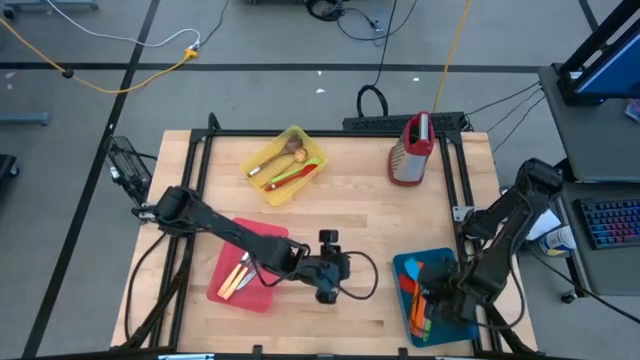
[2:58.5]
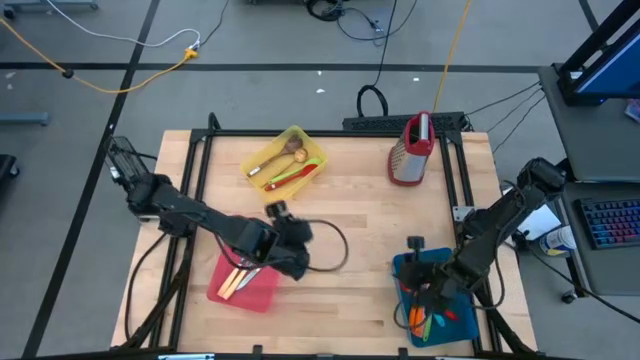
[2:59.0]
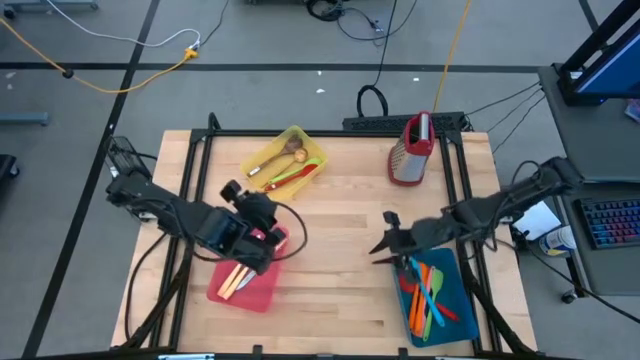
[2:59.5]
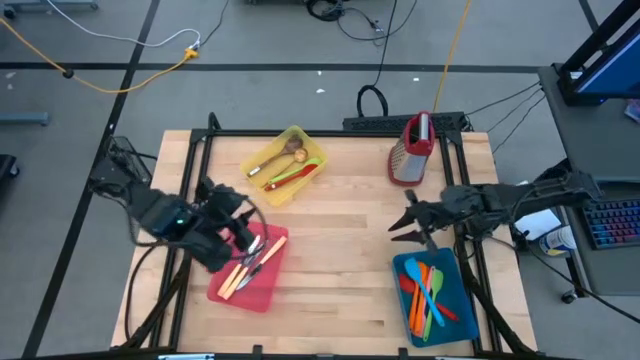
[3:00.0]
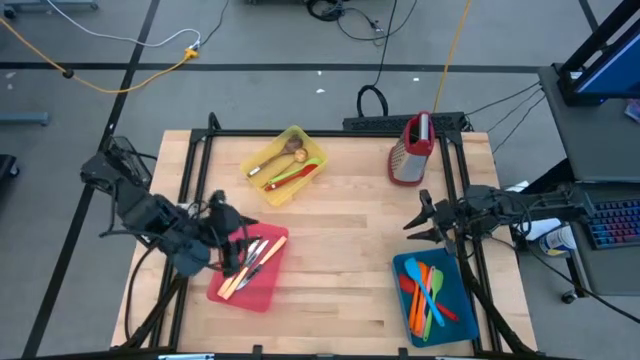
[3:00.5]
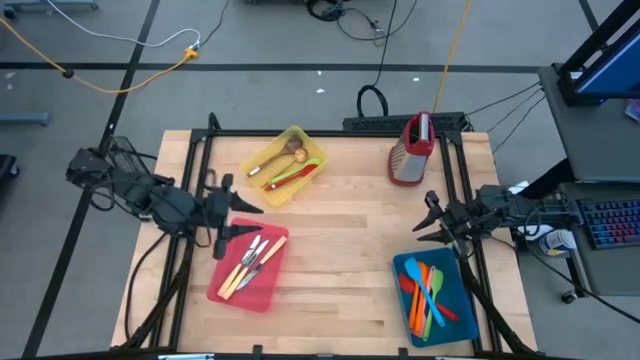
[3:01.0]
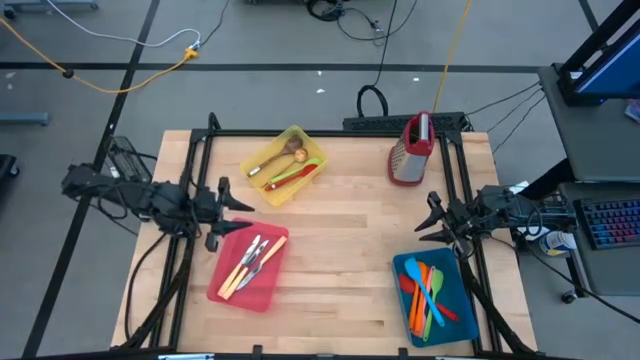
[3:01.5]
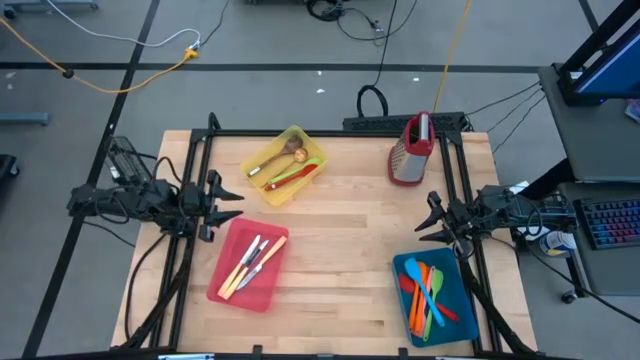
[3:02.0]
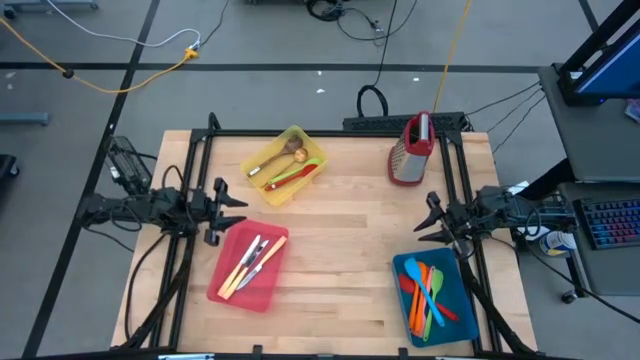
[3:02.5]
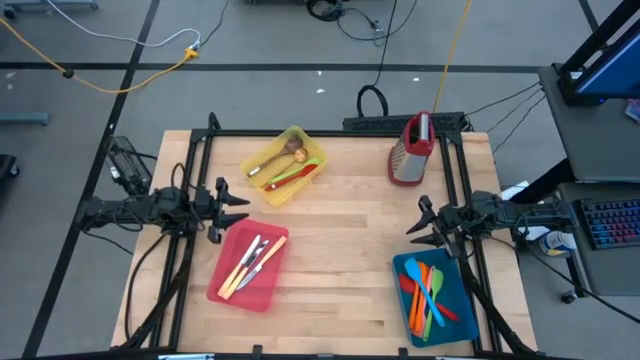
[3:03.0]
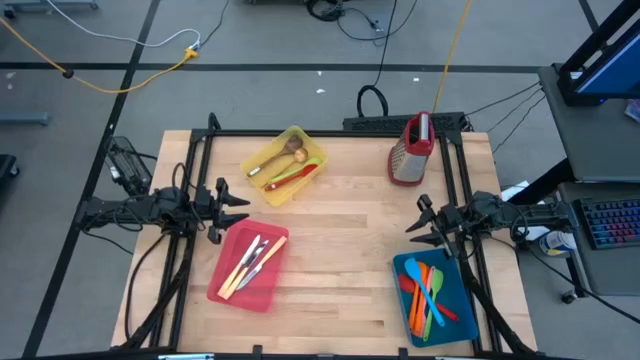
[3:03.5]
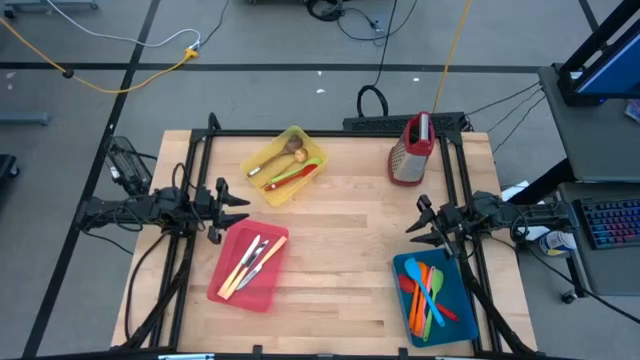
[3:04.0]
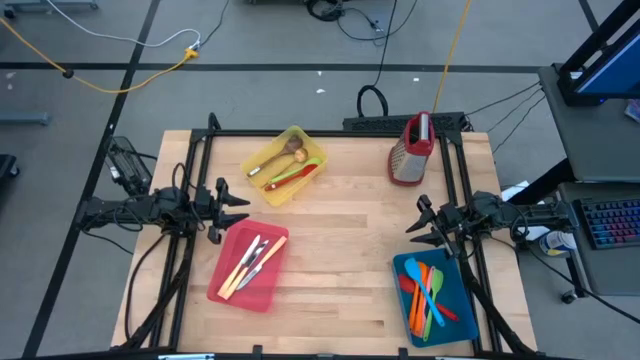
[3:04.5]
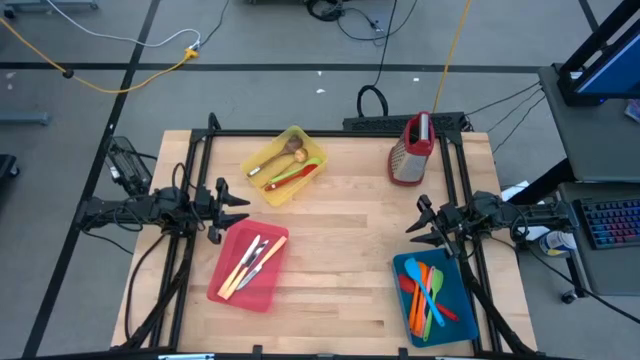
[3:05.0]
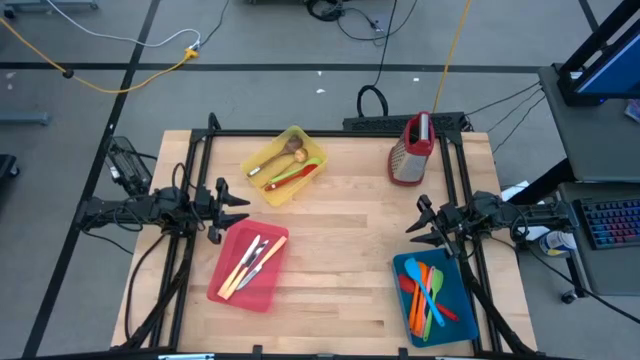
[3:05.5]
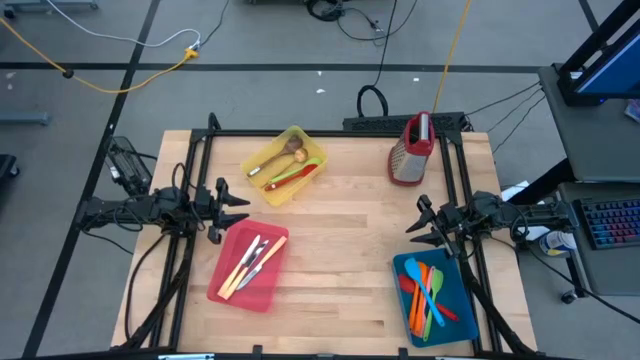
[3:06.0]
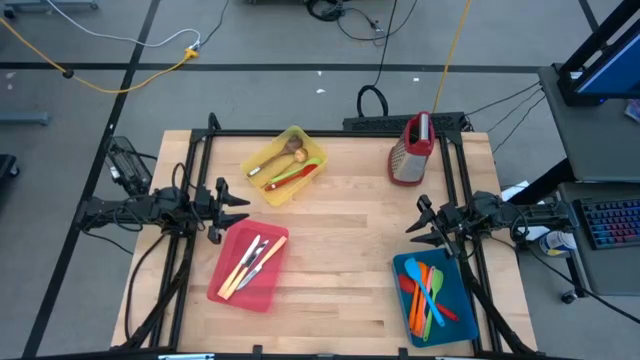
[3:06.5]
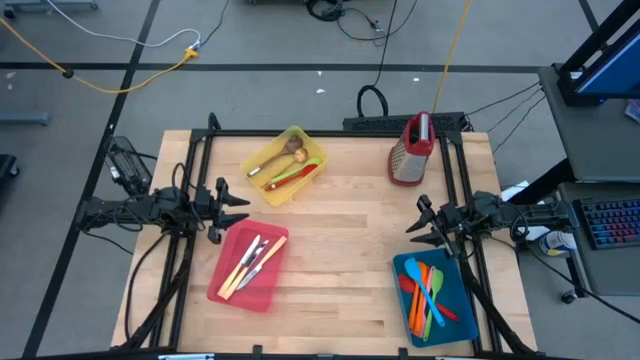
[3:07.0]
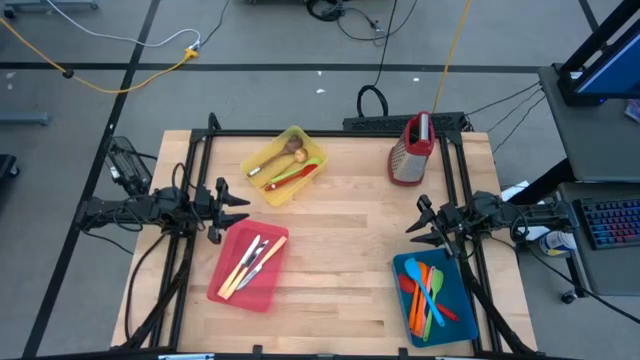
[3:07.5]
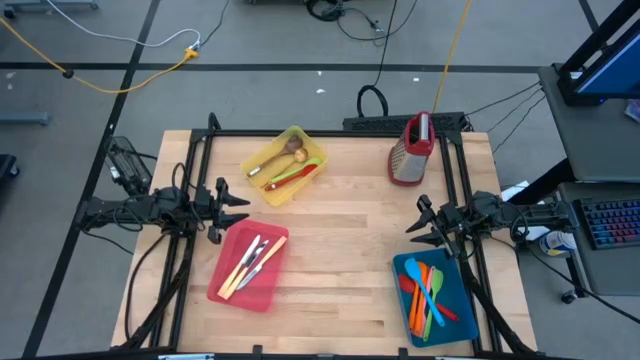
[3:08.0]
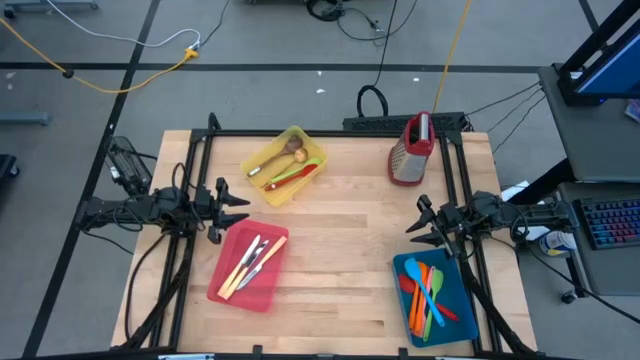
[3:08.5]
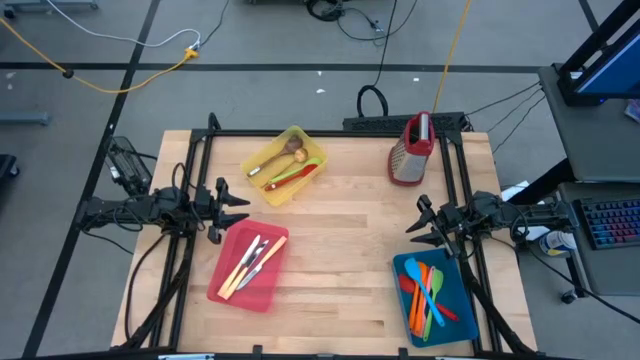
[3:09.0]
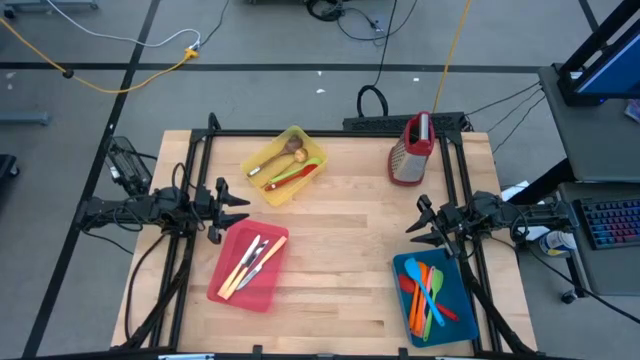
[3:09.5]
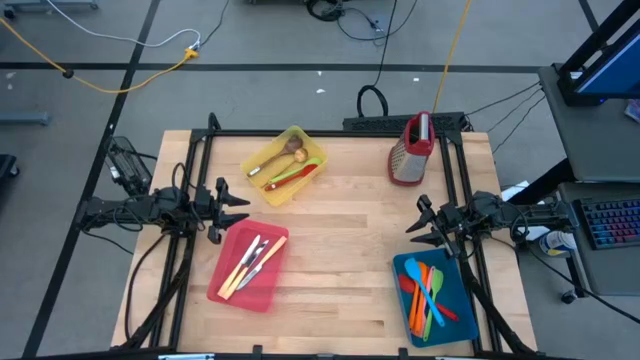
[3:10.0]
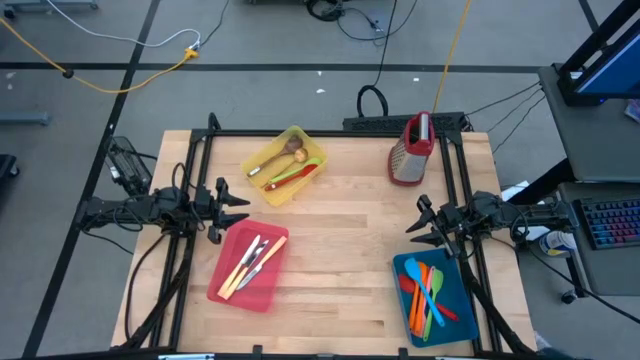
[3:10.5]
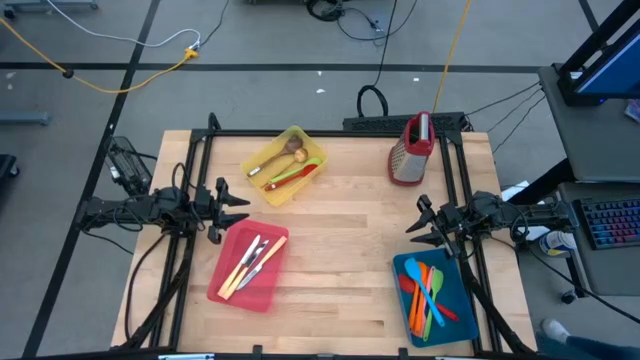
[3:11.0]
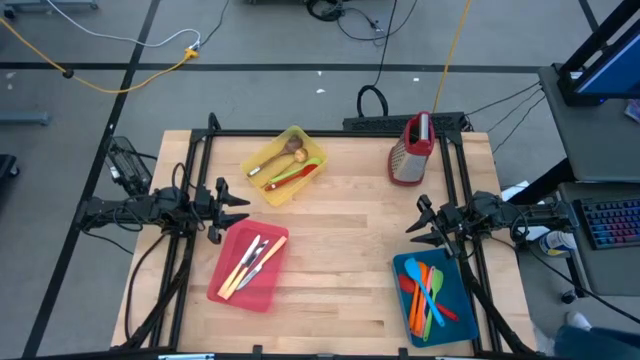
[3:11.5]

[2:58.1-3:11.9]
Task: Pick & Place Kitchen Items
Return to Home Position

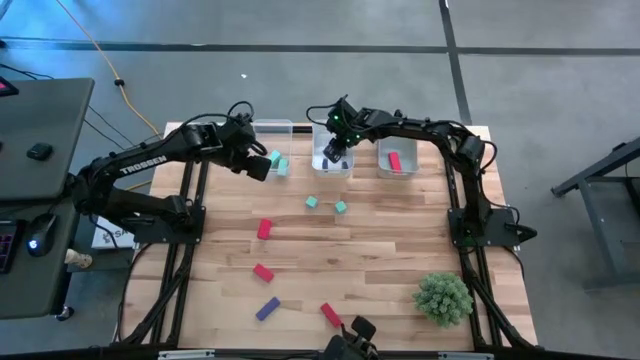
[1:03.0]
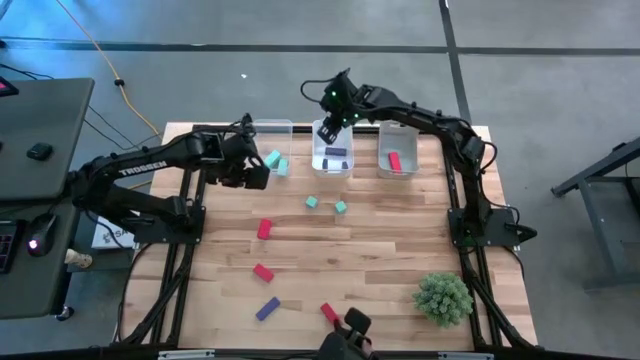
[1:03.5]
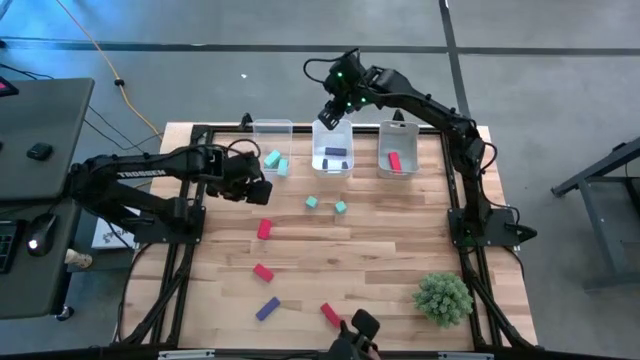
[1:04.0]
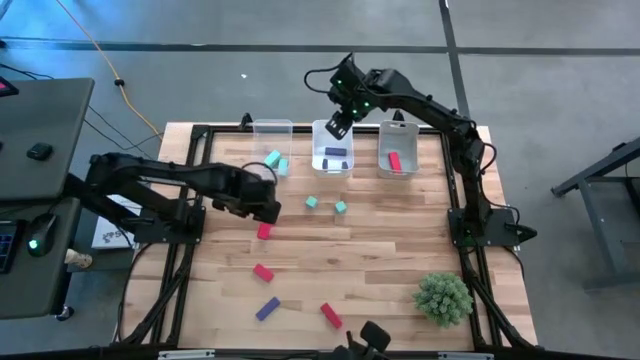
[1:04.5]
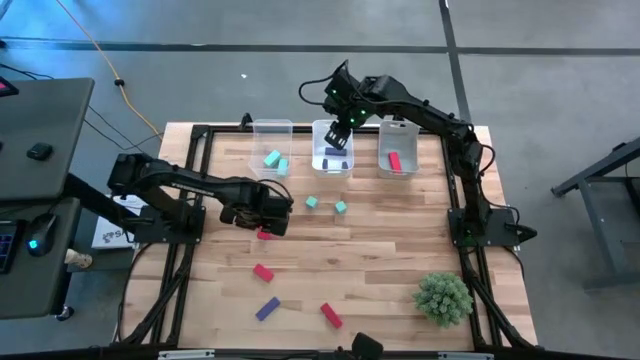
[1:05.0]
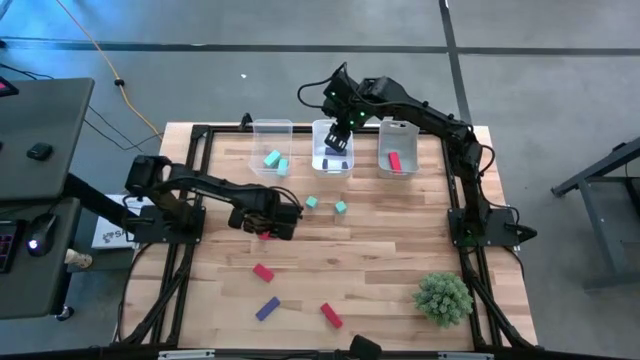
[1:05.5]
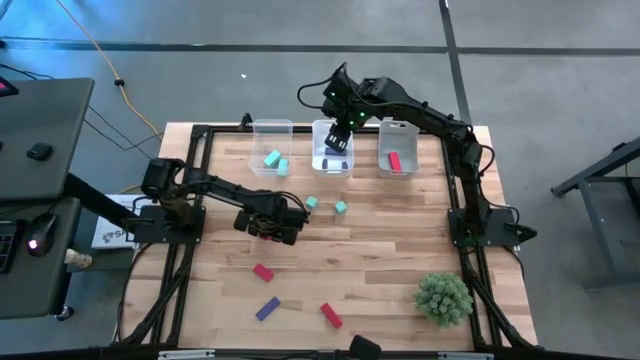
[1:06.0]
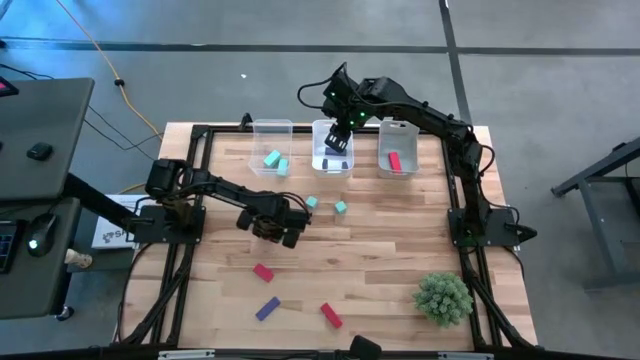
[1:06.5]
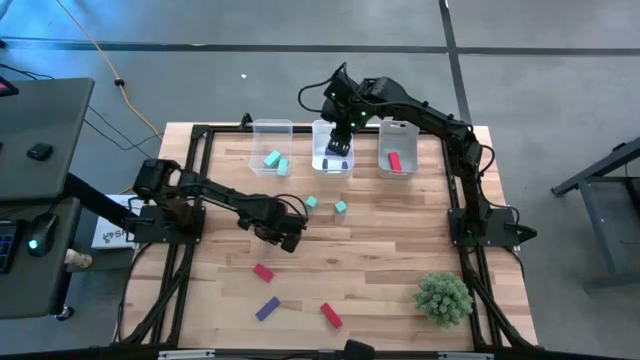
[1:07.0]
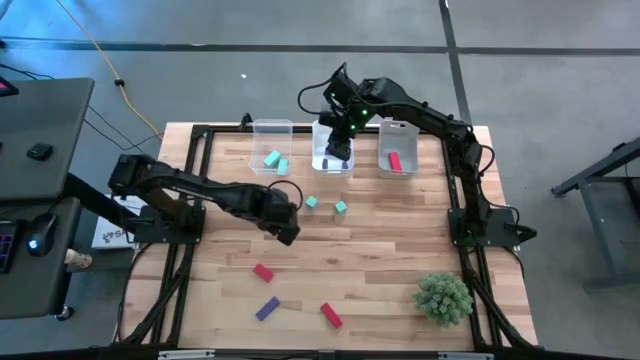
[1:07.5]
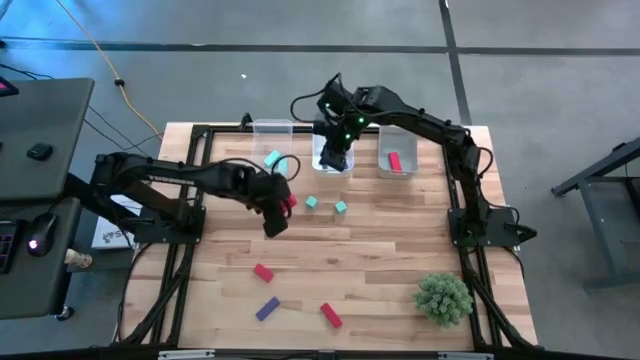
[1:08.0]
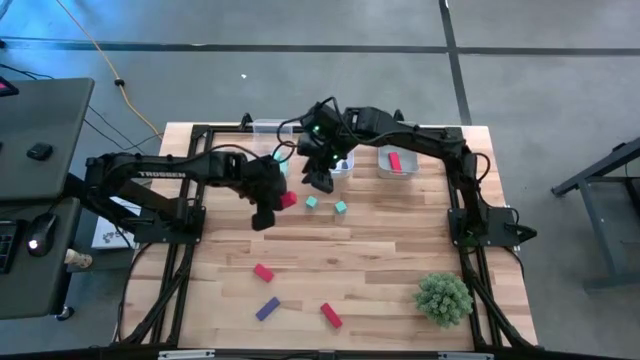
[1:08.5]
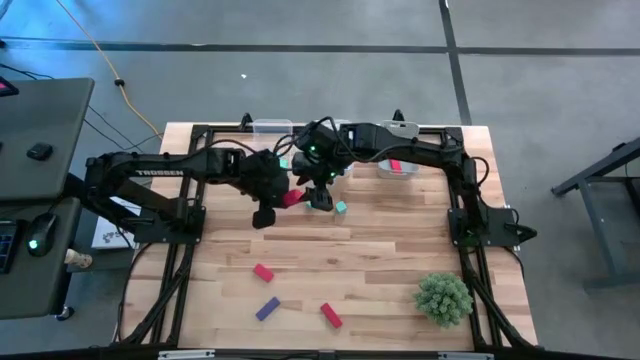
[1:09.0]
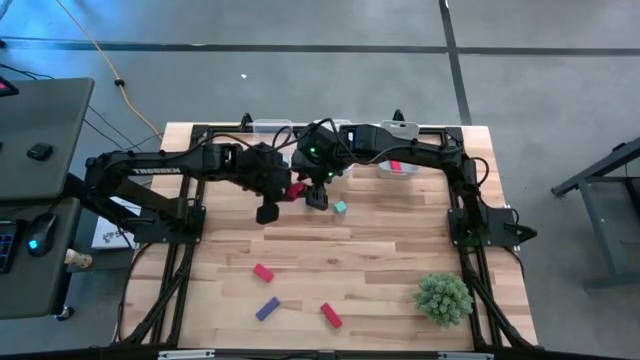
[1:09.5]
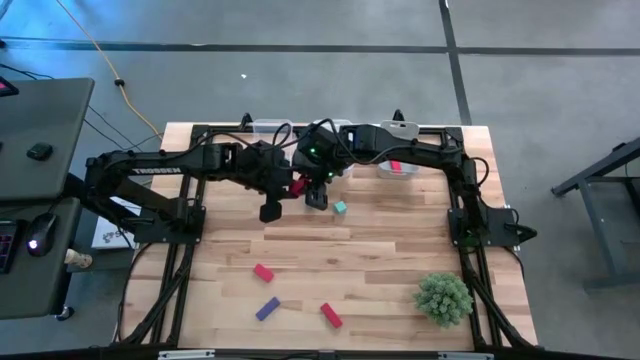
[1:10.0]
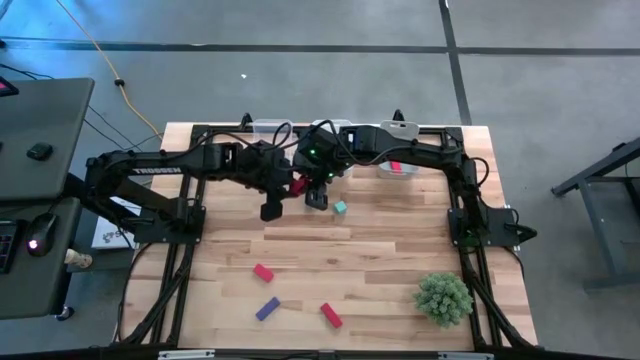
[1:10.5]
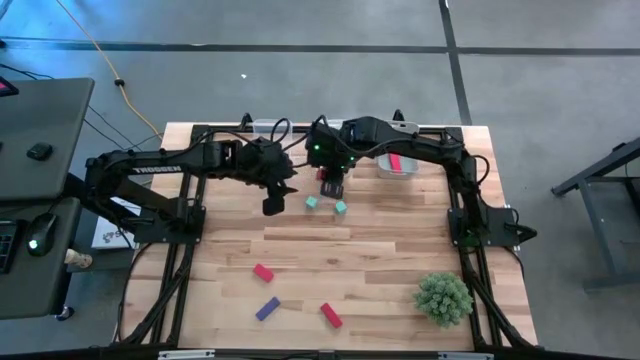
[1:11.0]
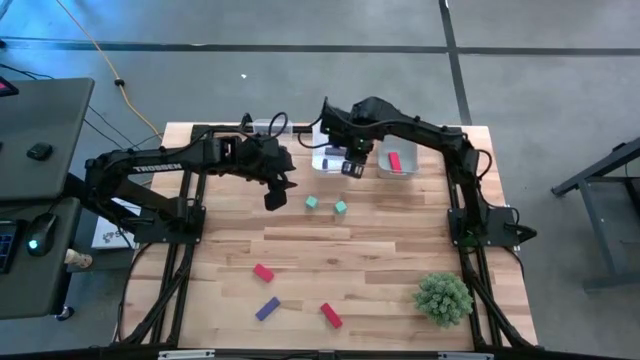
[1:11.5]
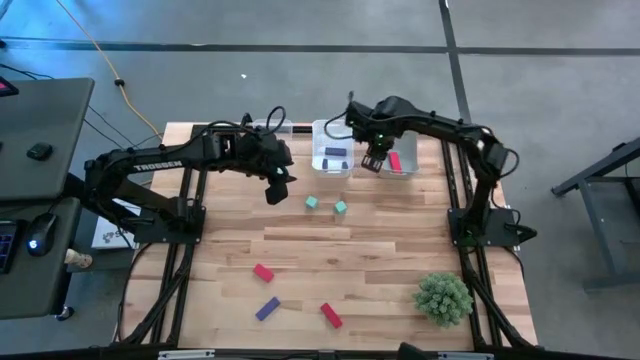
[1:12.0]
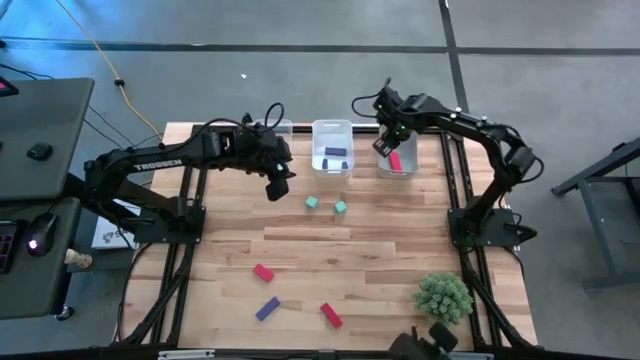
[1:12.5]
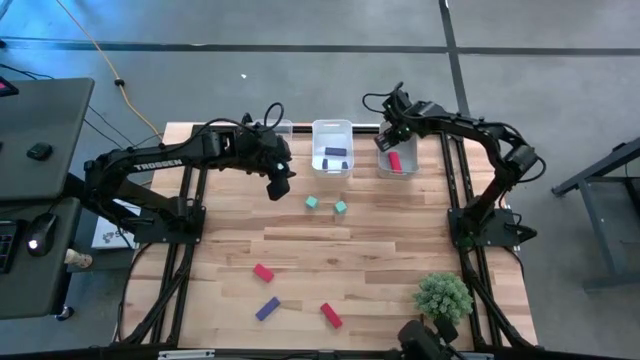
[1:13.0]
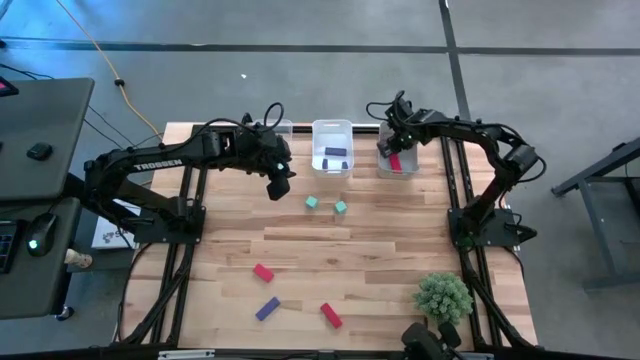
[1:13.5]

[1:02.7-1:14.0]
Task: Sort & place blocks by color
Put the red block into the gray bin
